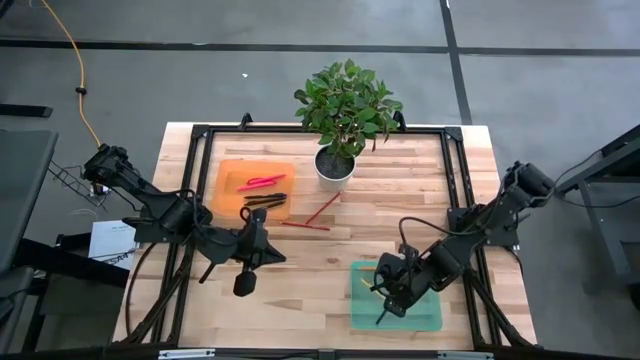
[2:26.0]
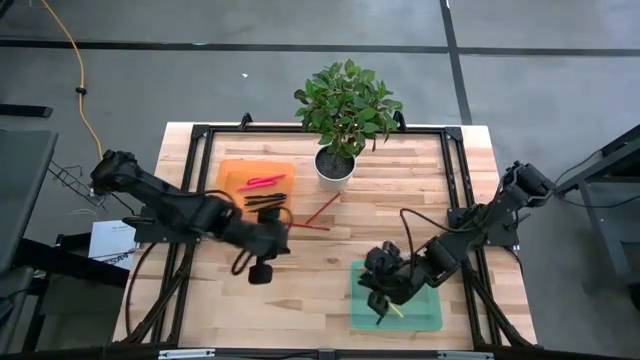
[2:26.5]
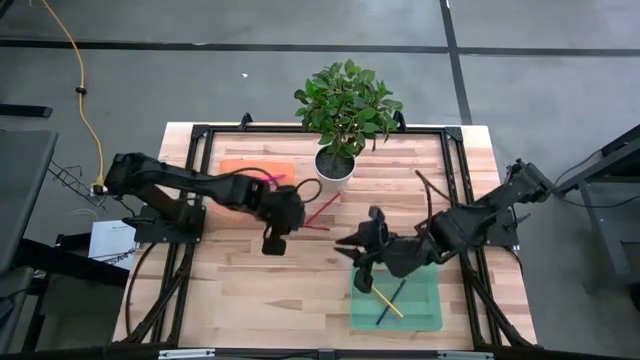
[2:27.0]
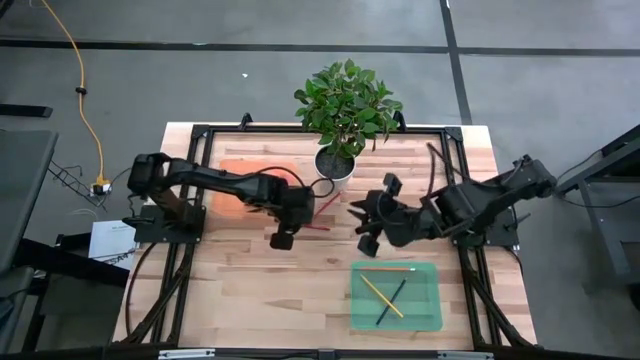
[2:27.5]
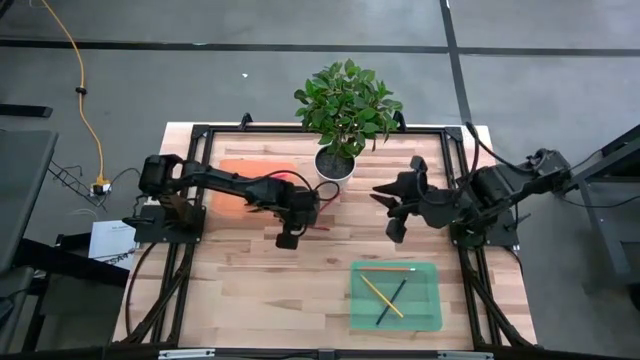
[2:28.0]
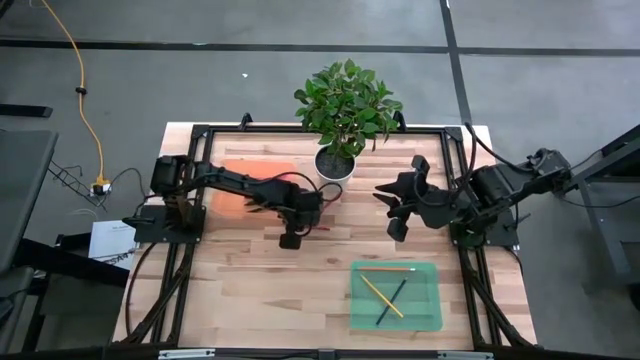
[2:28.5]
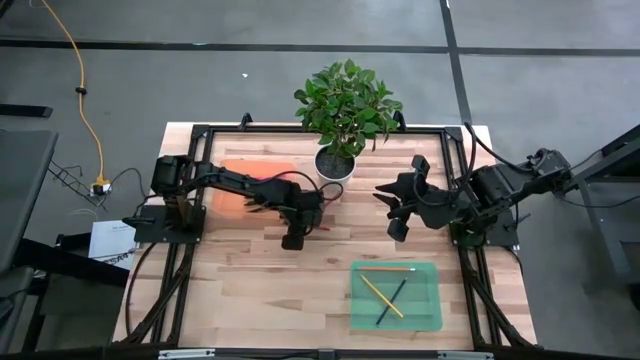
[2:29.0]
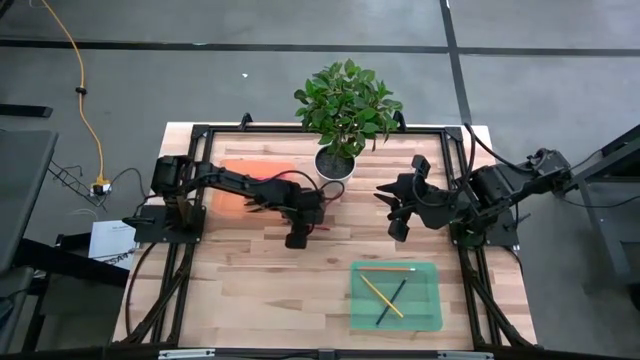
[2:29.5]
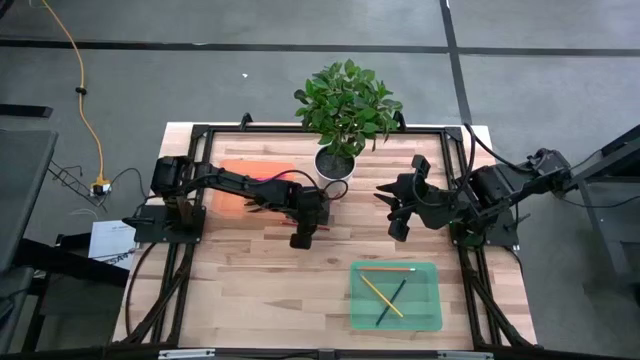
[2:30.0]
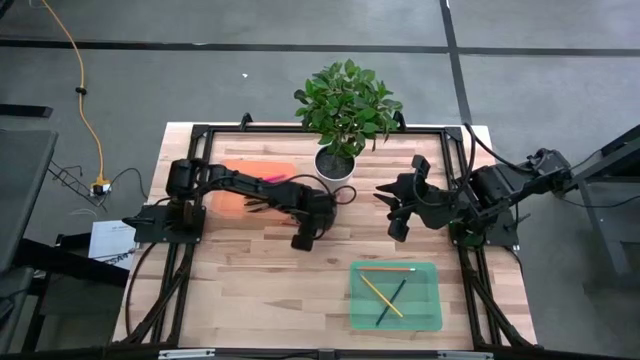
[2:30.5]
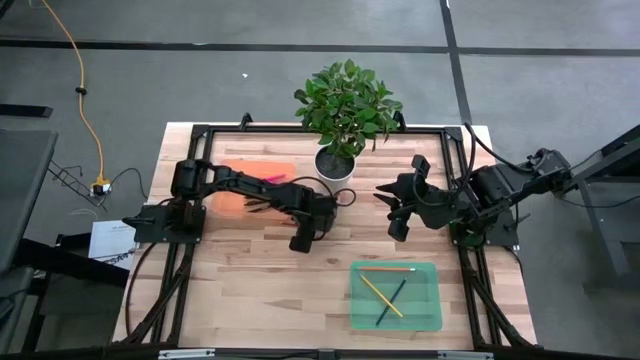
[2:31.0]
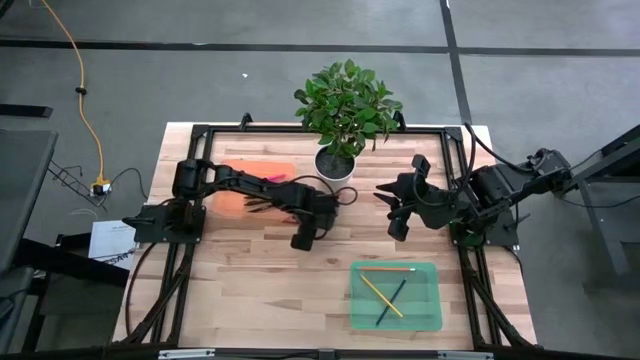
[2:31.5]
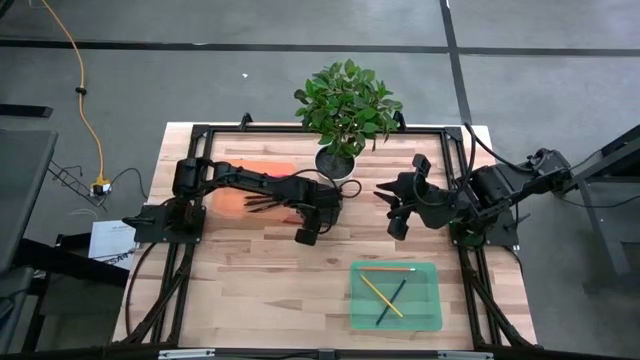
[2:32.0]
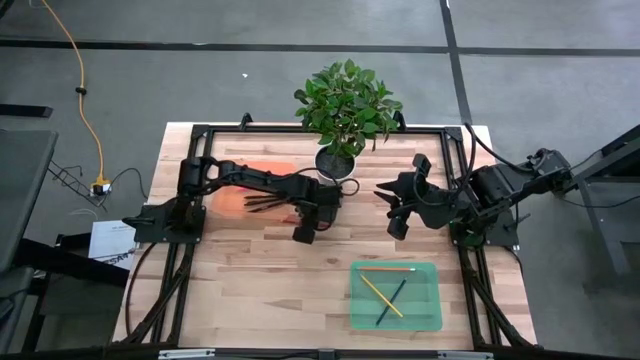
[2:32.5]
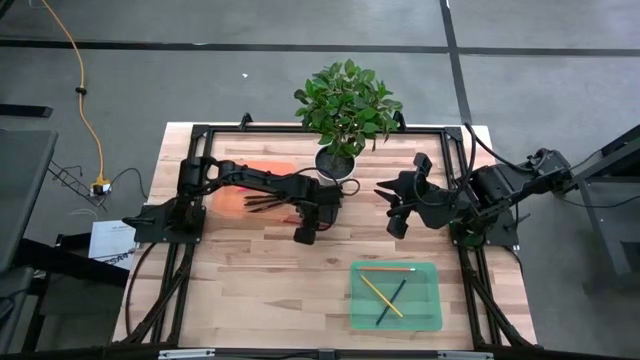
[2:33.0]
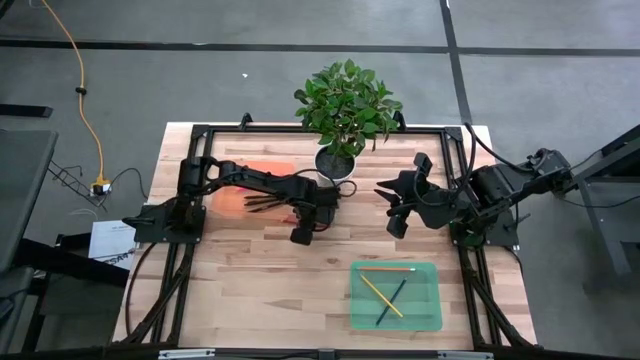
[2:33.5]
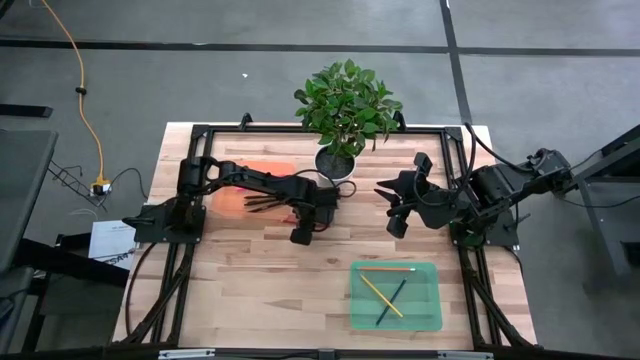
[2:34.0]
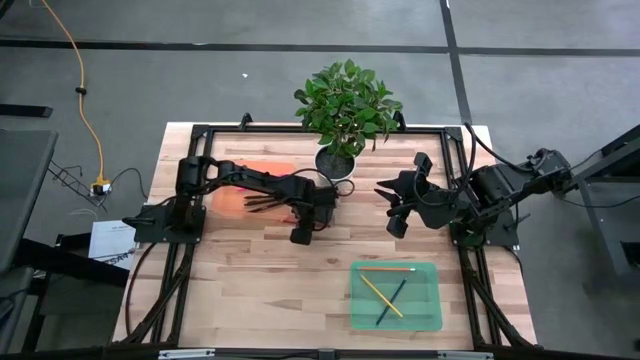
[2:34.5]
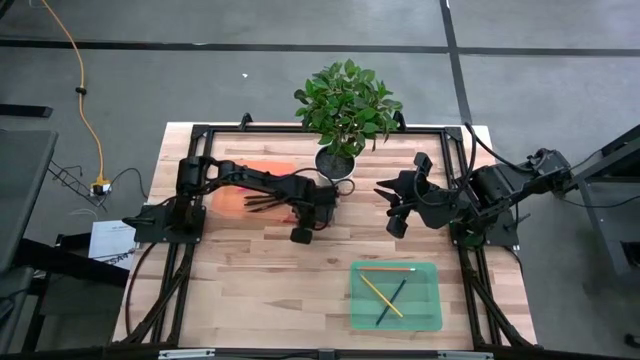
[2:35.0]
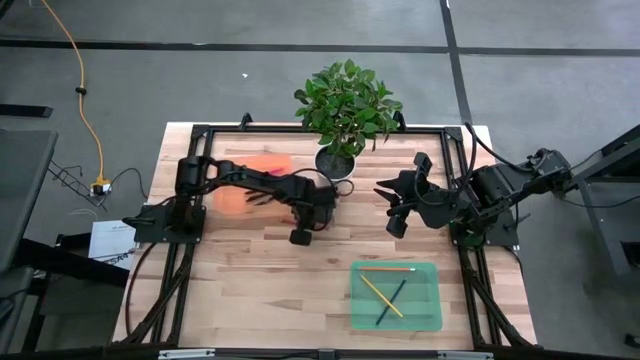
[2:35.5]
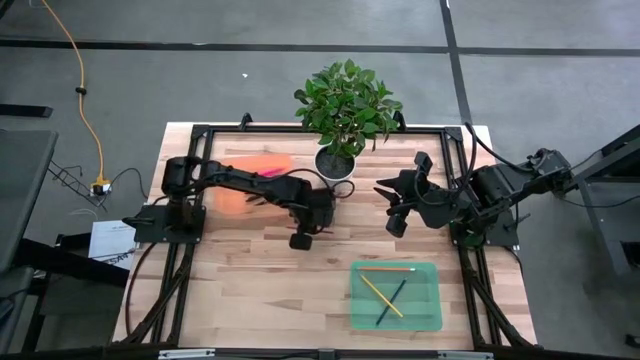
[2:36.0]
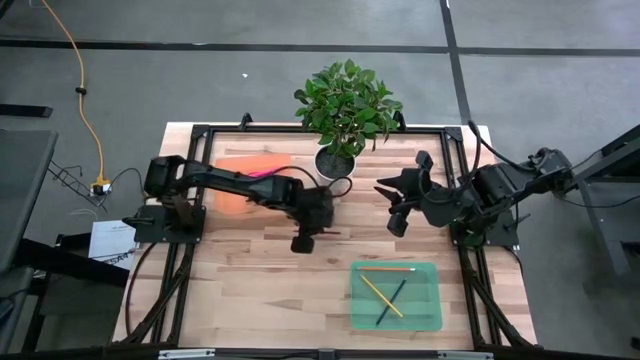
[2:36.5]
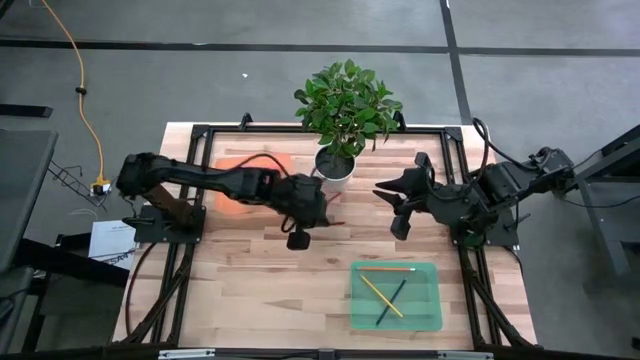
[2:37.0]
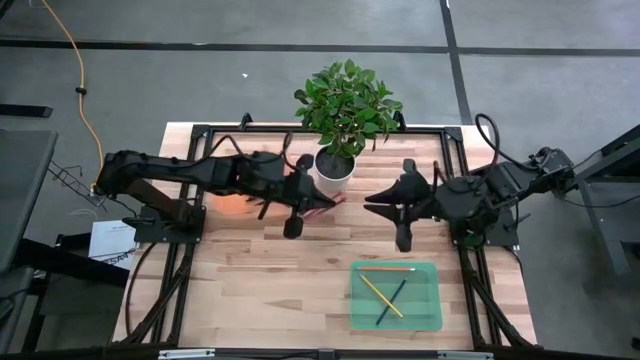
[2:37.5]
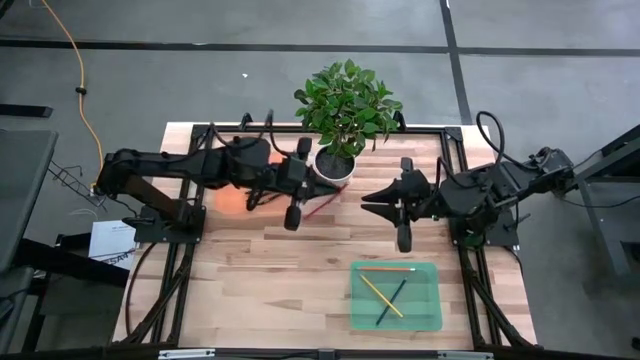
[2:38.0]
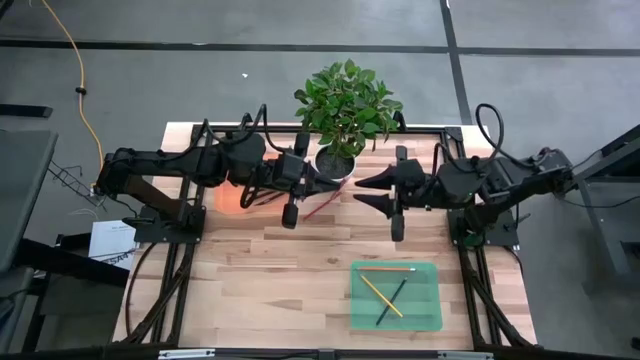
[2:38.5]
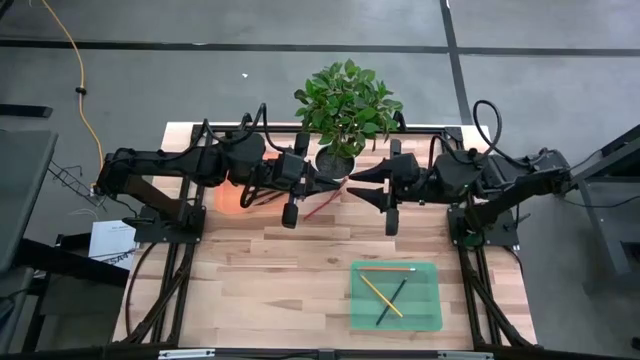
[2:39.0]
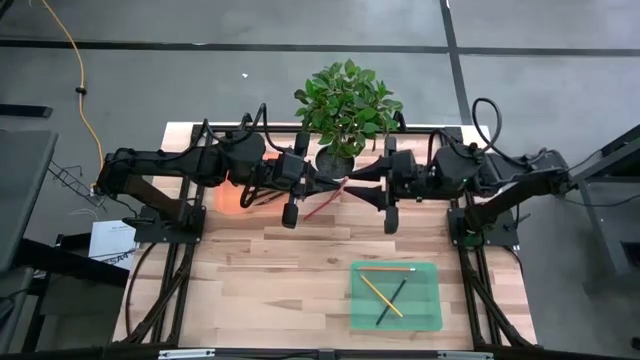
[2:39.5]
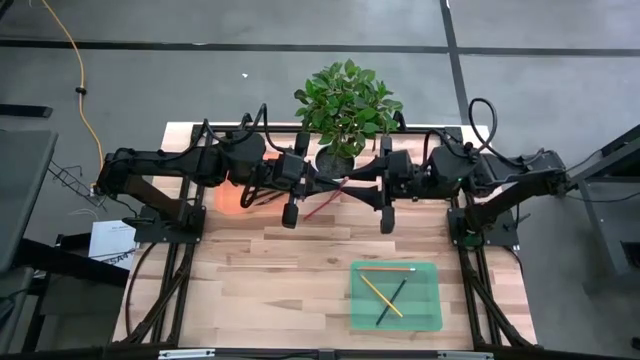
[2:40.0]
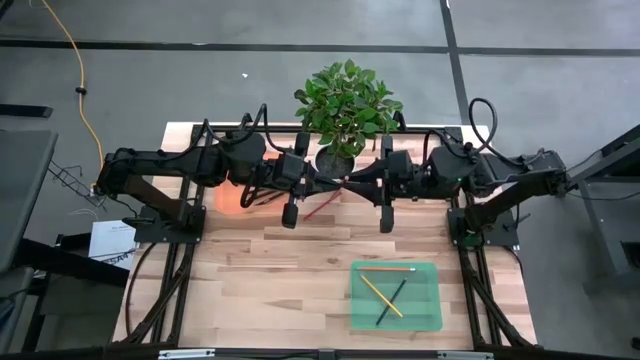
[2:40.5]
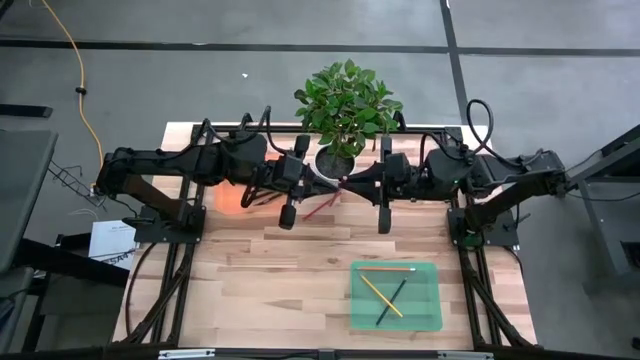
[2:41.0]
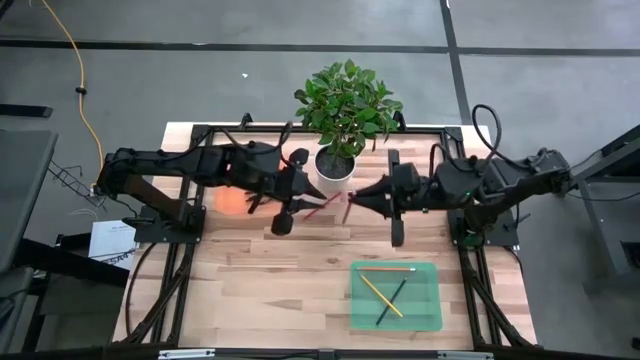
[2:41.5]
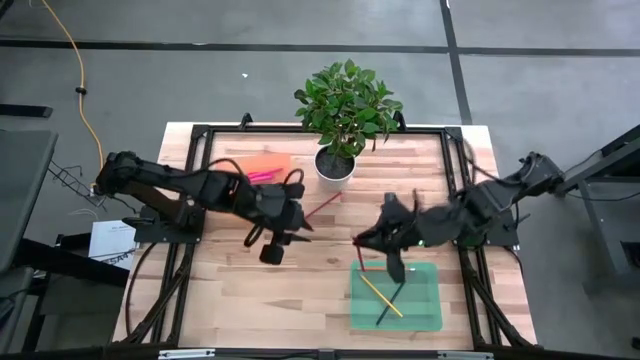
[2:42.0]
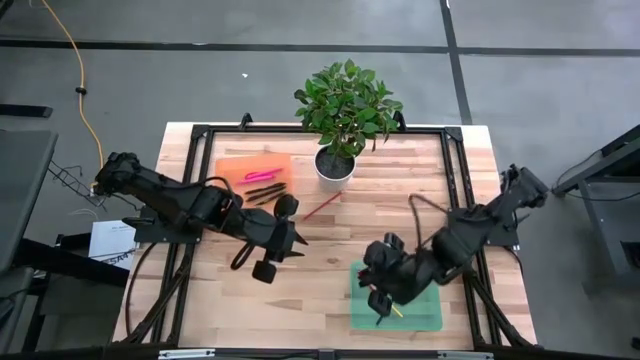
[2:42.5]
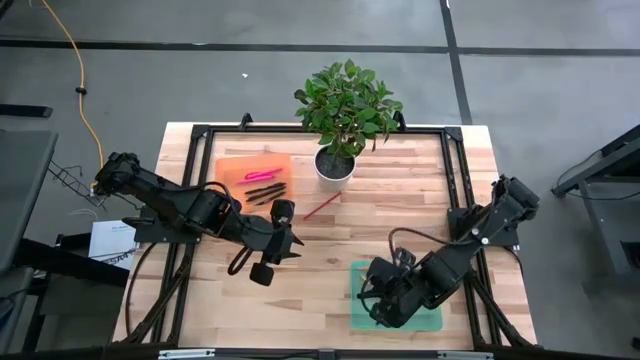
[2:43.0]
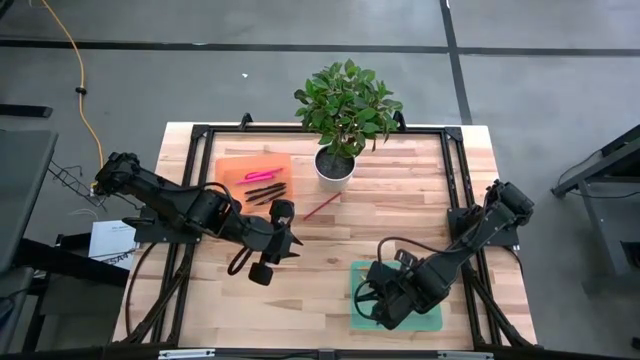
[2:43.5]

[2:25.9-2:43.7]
Task: Sort pens & pencils
Put the bottom red colored pencil into the green bin

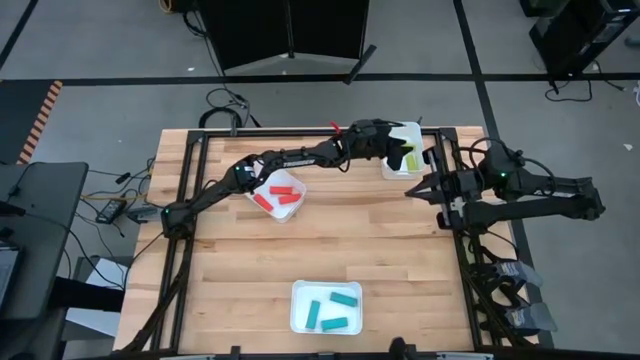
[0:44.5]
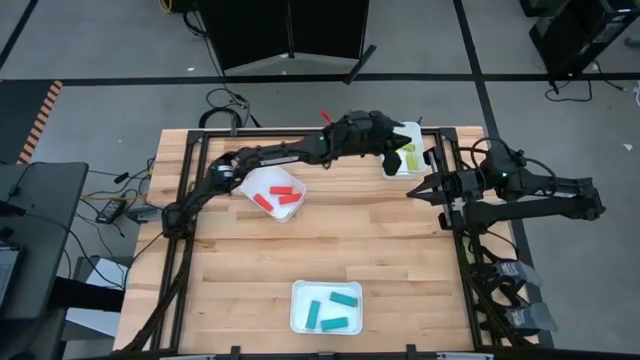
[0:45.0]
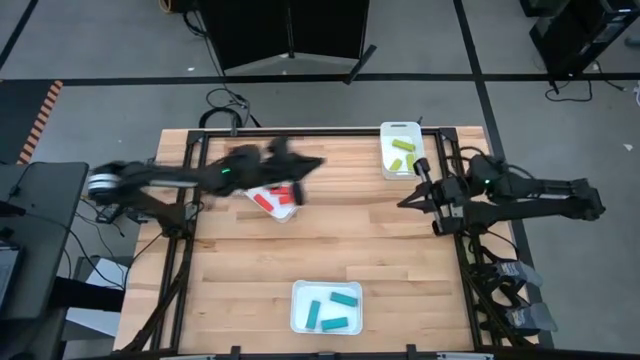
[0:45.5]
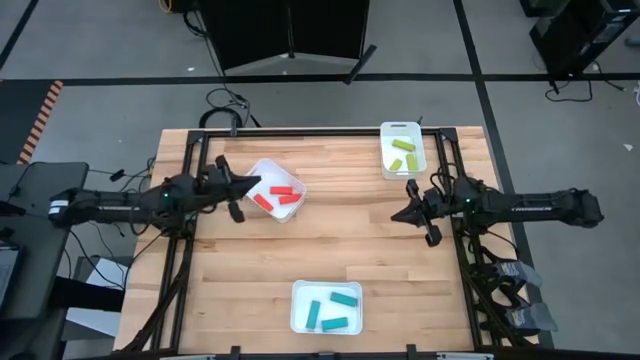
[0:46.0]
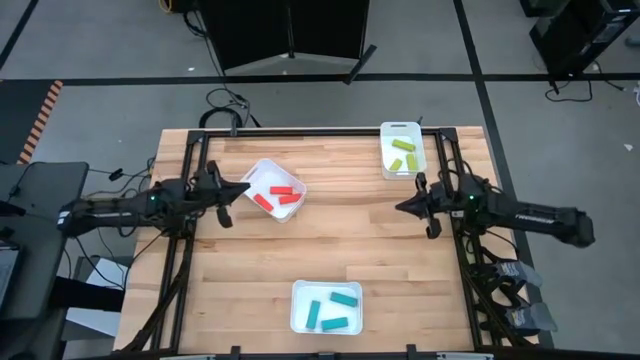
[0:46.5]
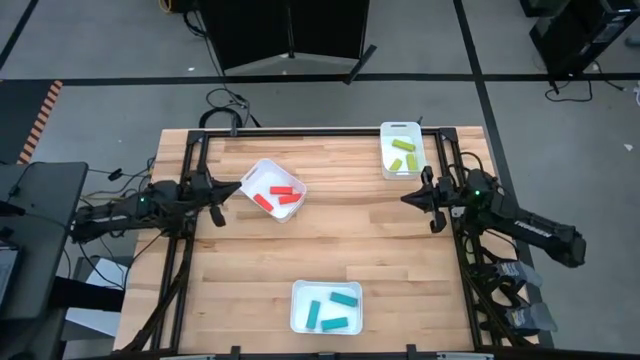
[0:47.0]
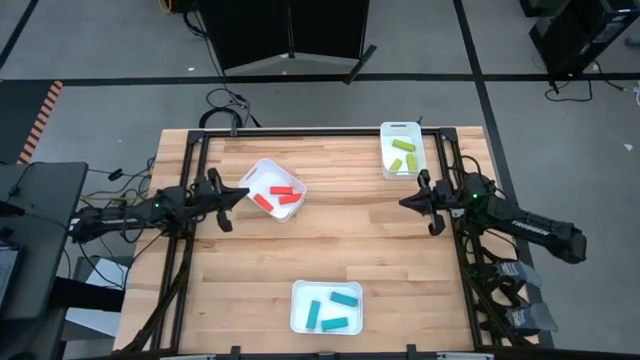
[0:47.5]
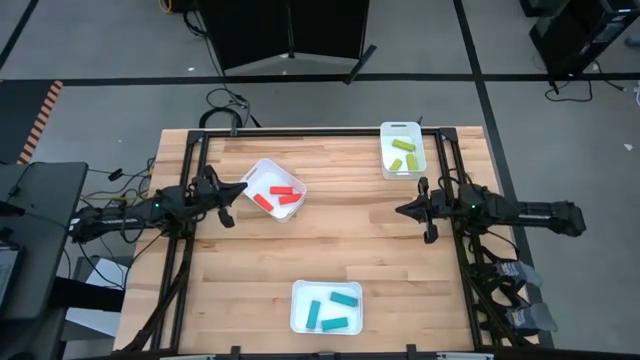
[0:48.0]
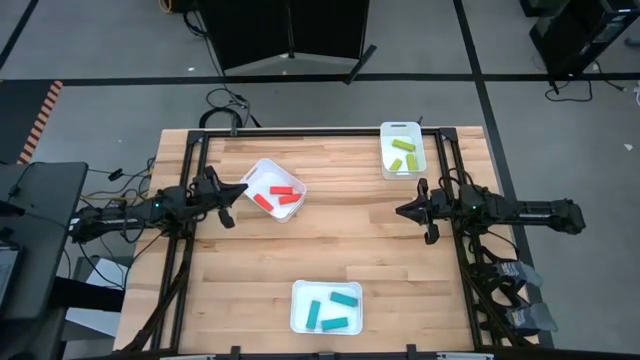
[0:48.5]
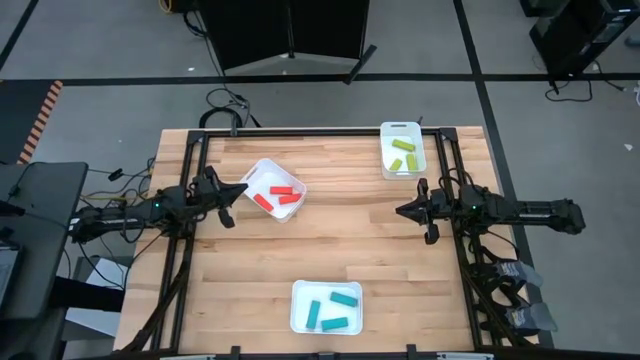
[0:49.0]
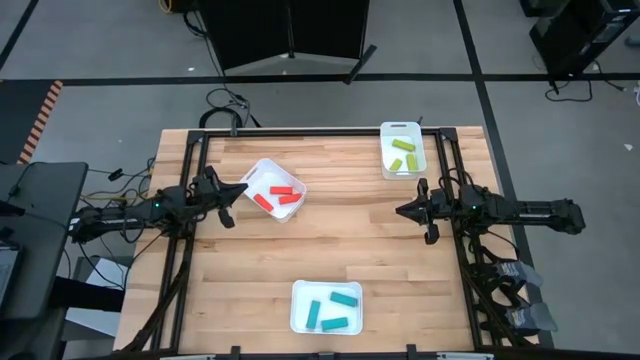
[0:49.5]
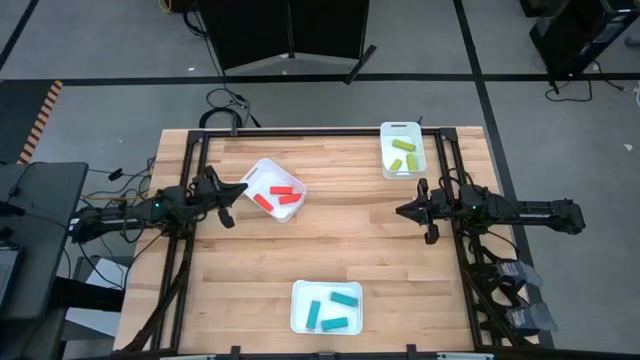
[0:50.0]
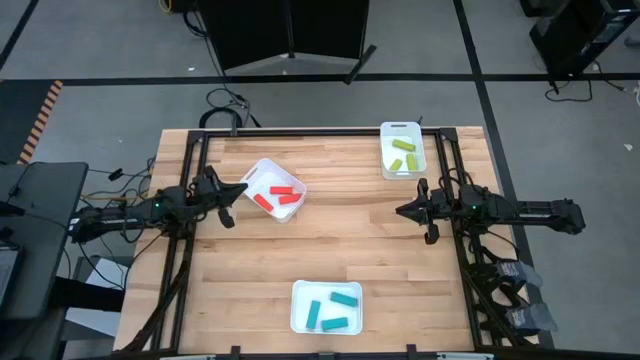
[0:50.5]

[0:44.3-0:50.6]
Task: Sort blocks
Return to Home Position
